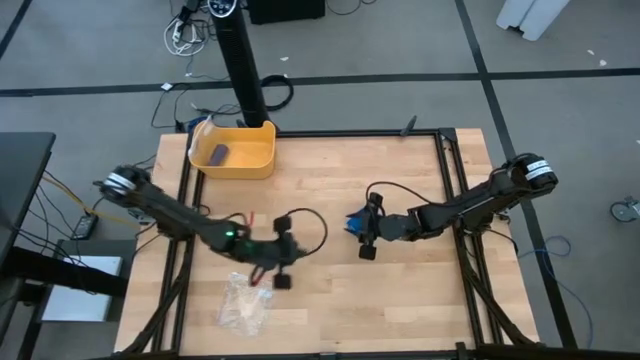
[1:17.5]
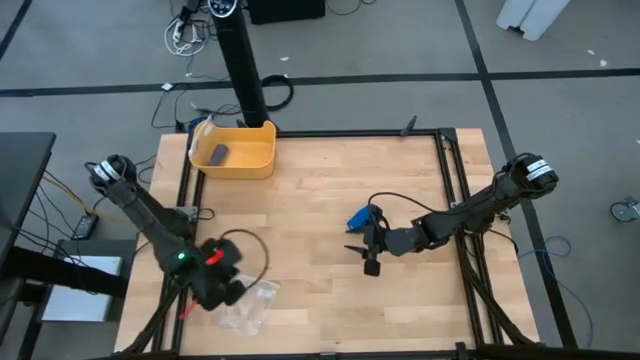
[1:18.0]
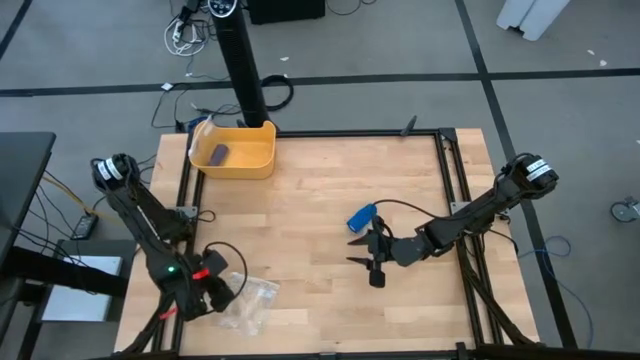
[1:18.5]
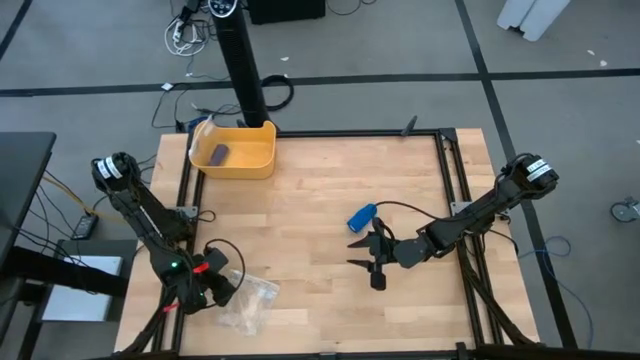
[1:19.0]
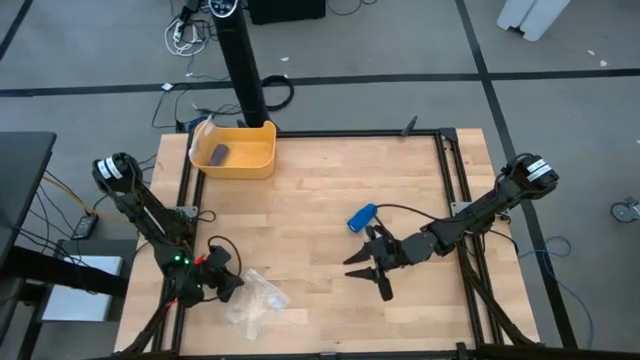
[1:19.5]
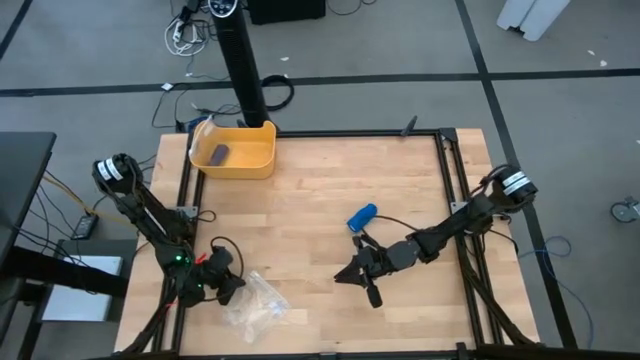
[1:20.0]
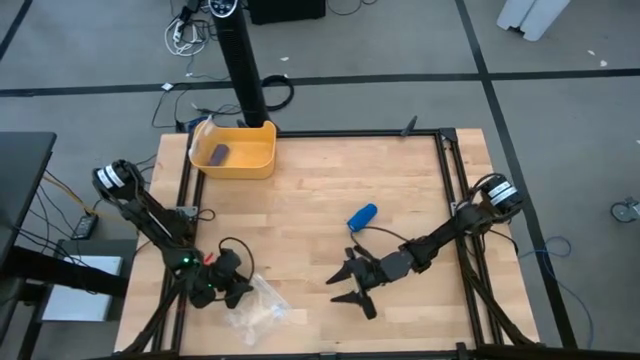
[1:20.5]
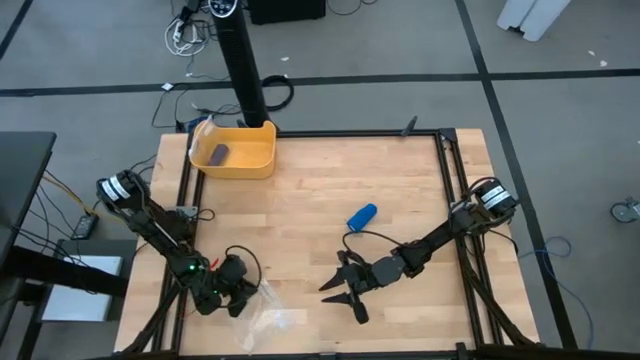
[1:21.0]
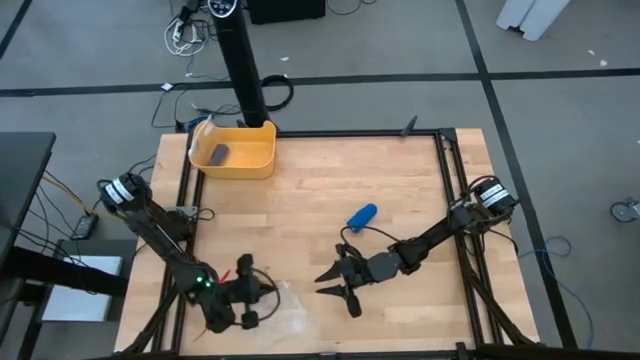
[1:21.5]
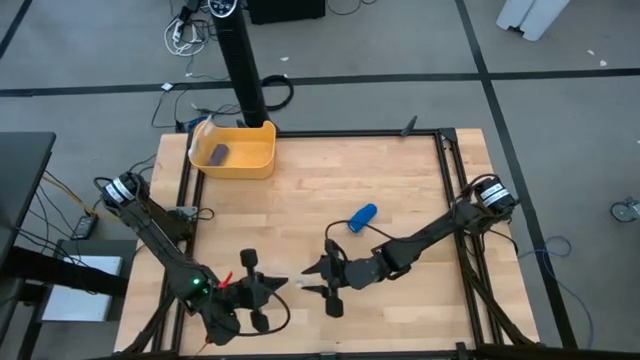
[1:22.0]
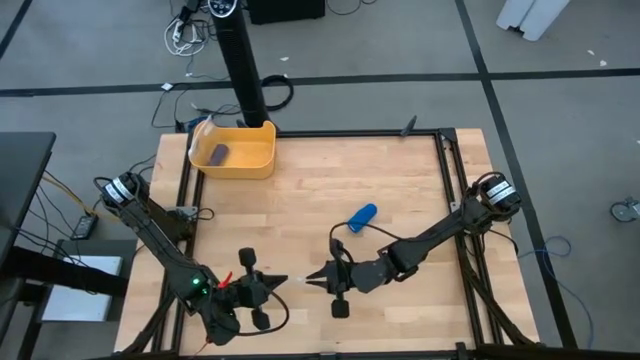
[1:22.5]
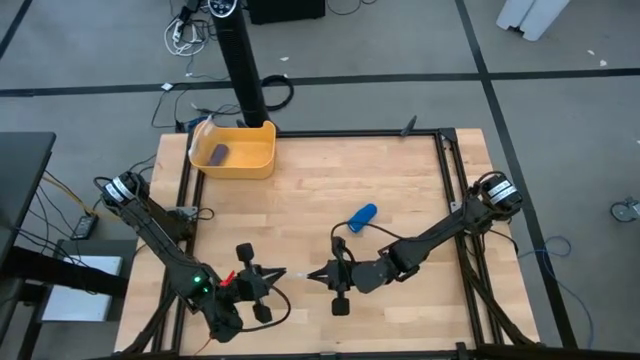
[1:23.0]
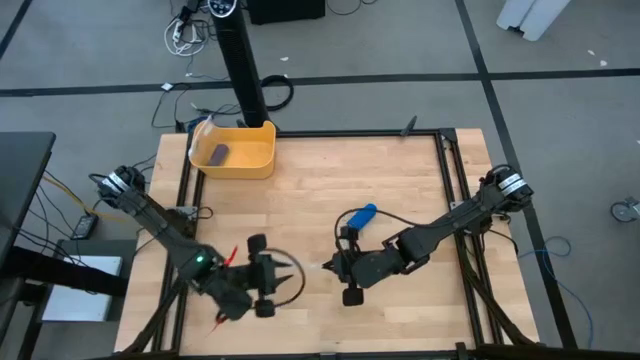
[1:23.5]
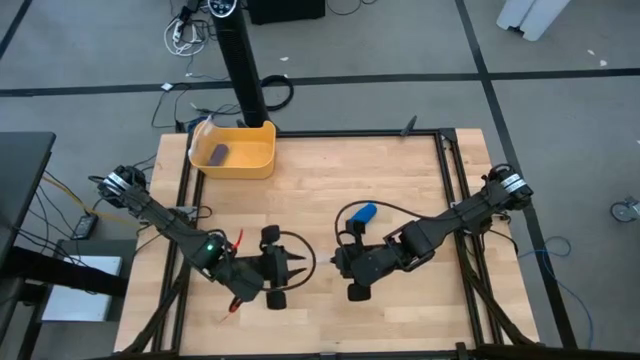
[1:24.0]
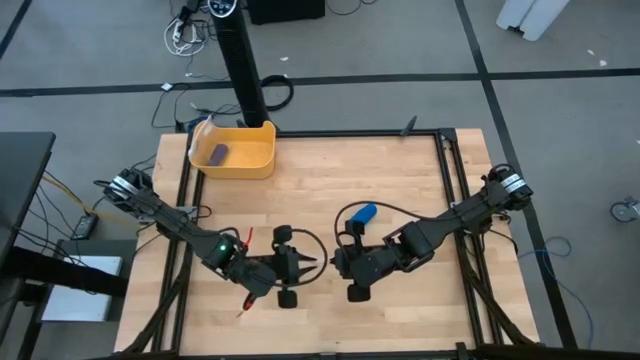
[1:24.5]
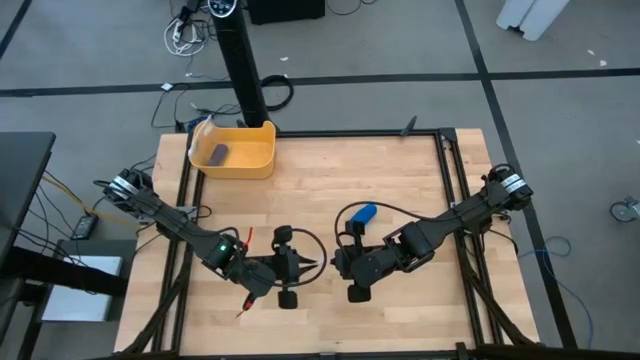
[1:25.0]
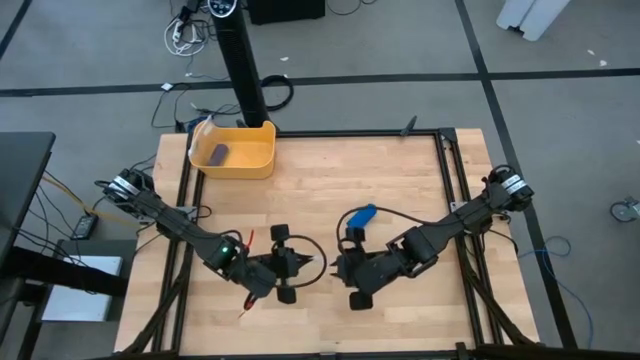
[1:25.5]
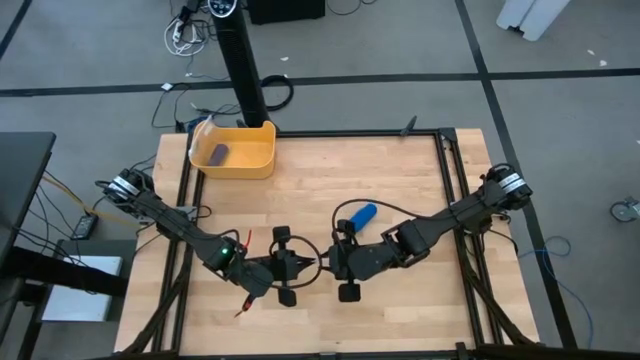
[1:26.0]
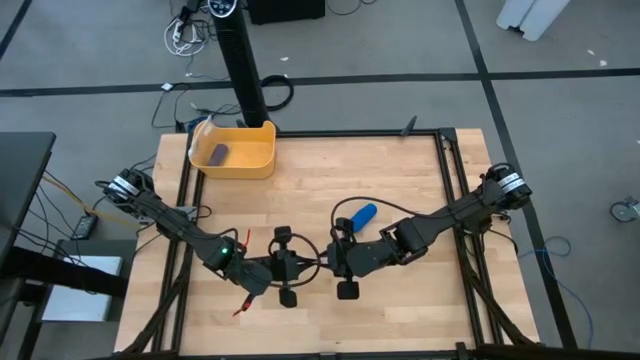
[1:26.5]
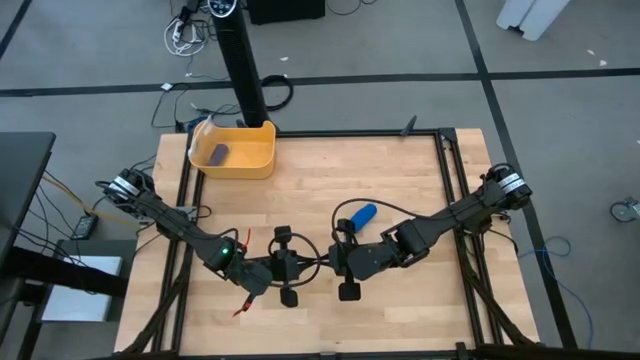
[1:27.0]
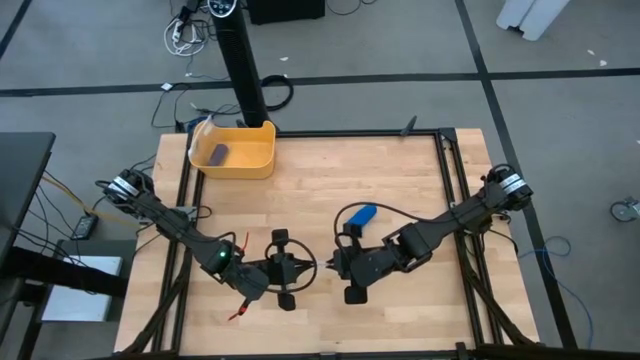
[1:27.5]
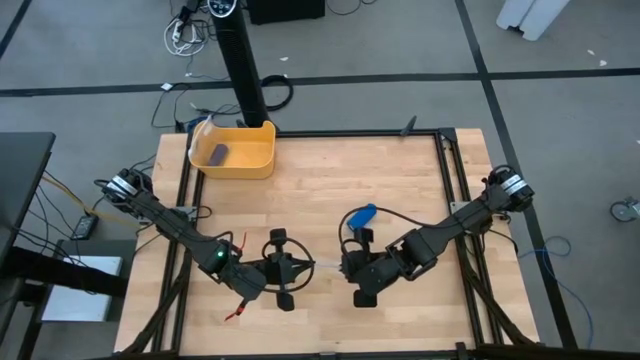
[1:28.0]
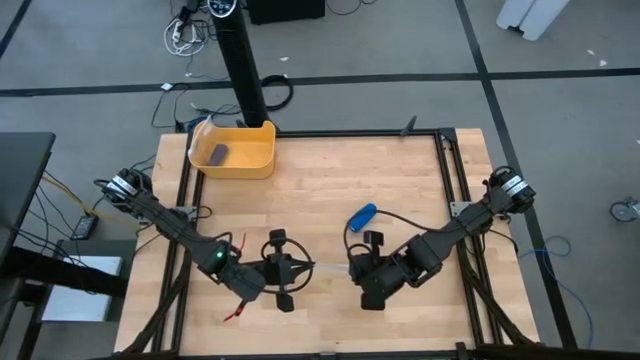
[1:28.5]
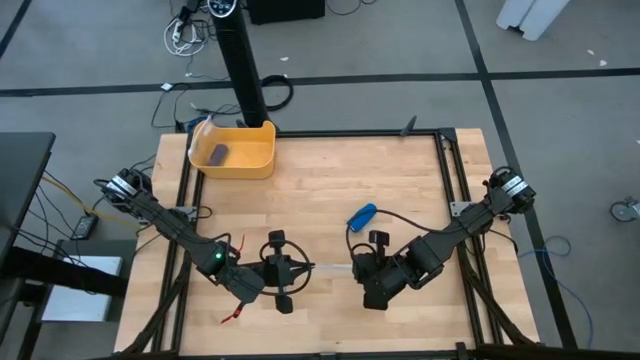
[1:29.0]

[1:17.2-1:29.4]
Task: Roll bandage
Open the transparent zip bag

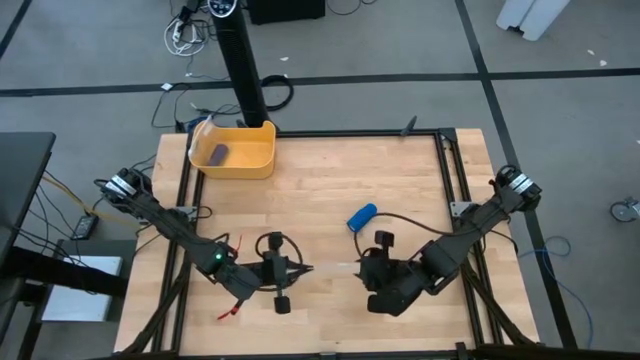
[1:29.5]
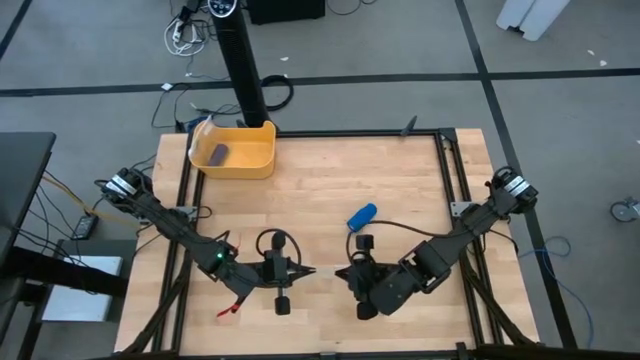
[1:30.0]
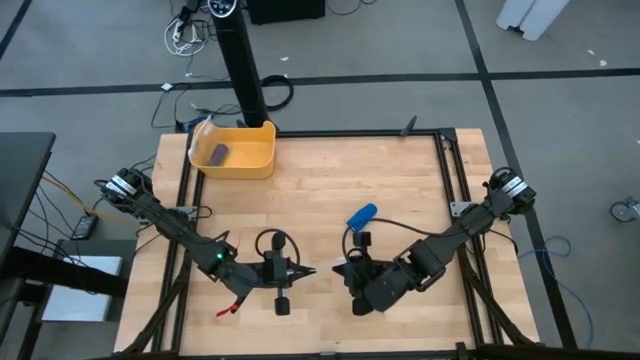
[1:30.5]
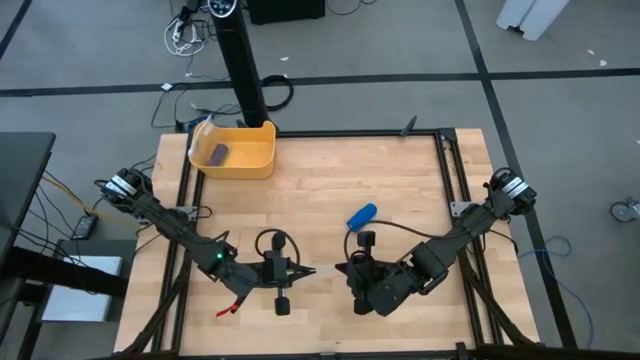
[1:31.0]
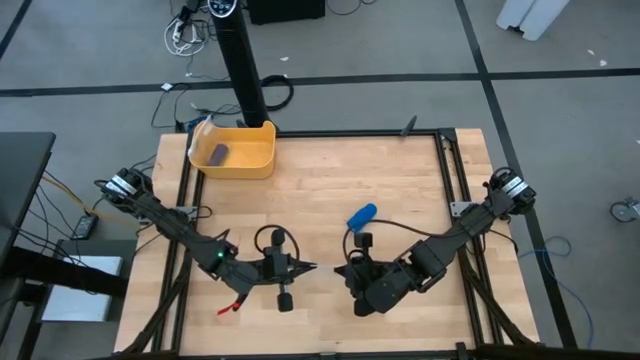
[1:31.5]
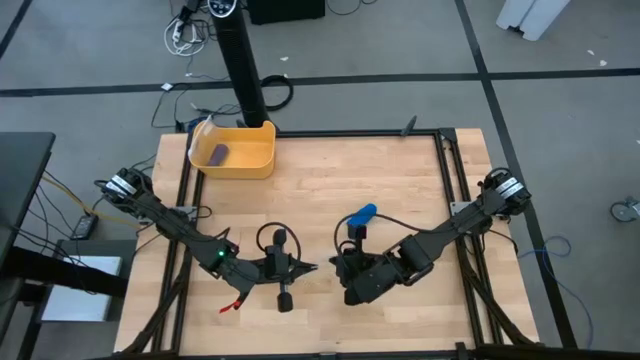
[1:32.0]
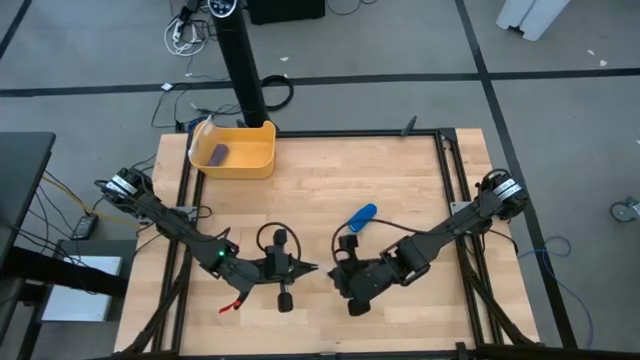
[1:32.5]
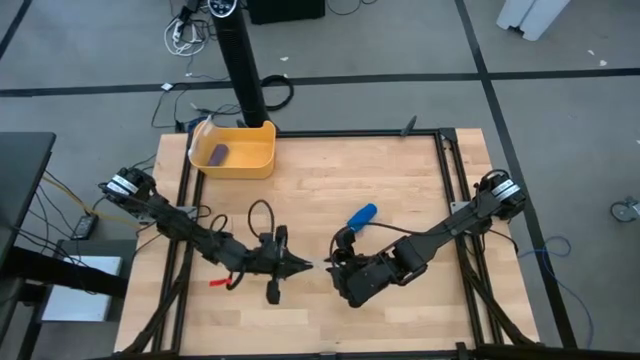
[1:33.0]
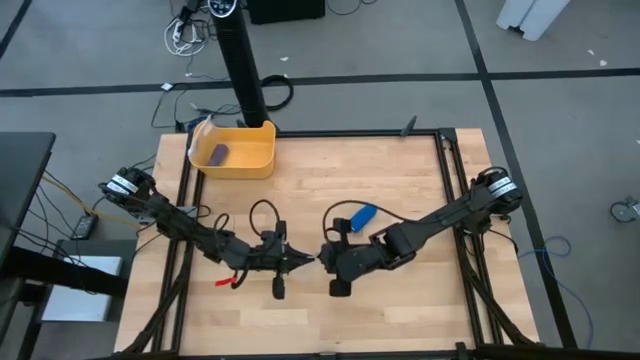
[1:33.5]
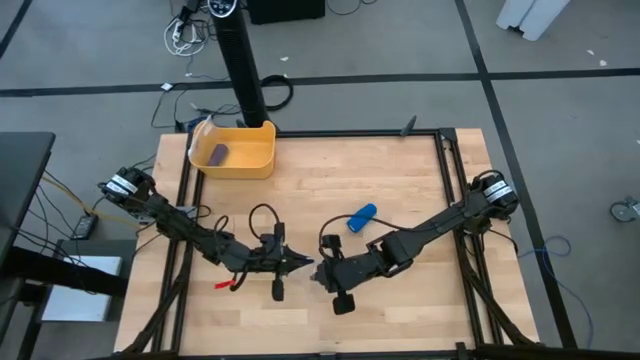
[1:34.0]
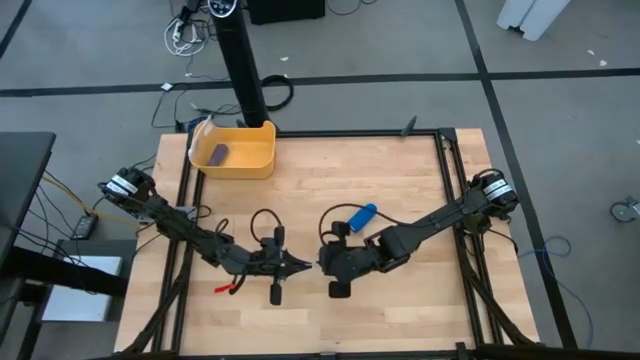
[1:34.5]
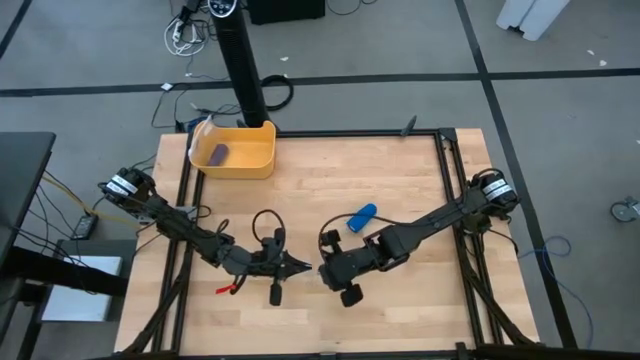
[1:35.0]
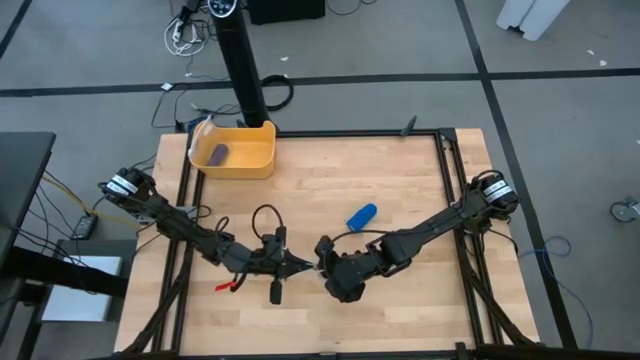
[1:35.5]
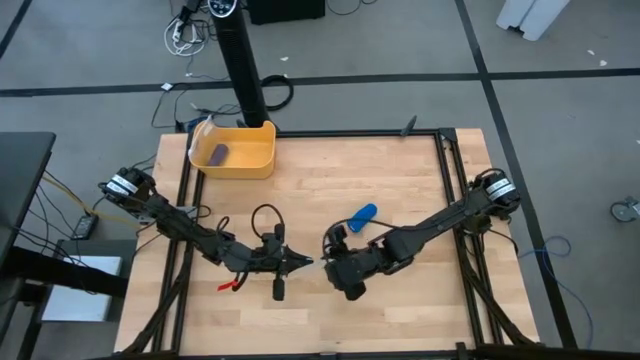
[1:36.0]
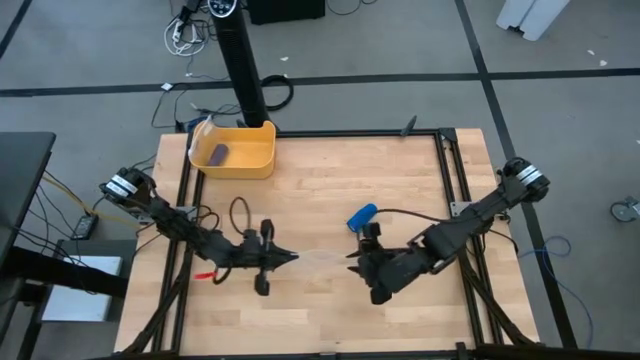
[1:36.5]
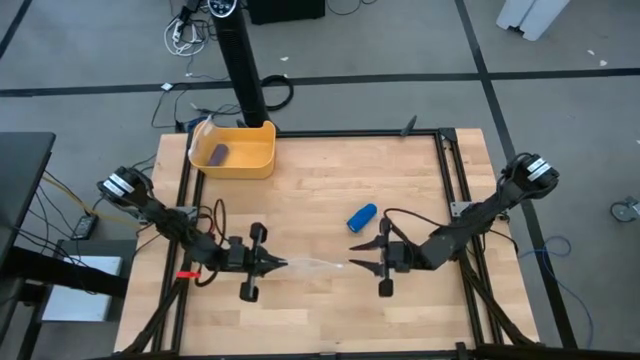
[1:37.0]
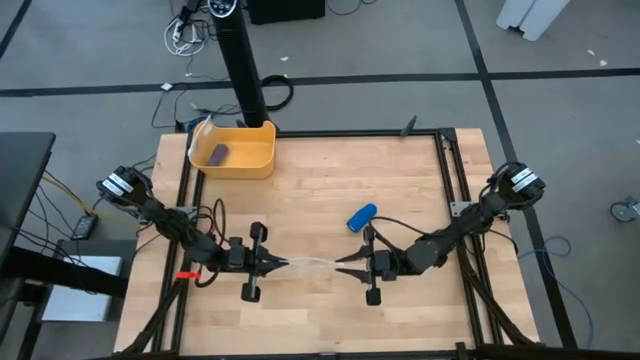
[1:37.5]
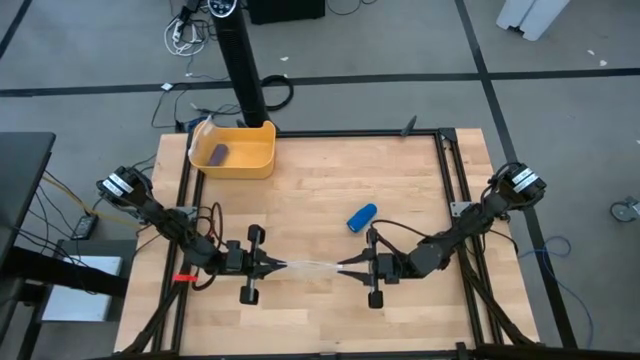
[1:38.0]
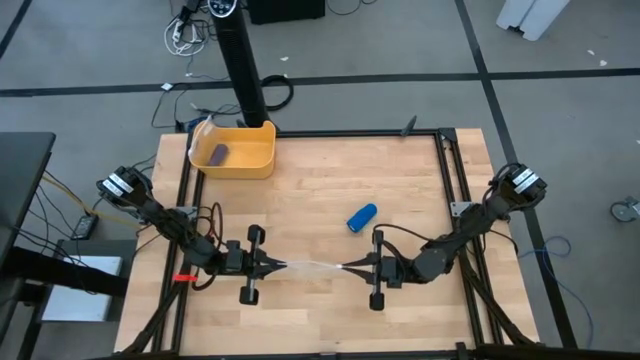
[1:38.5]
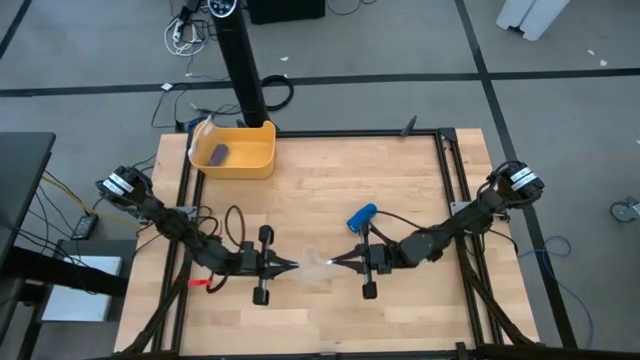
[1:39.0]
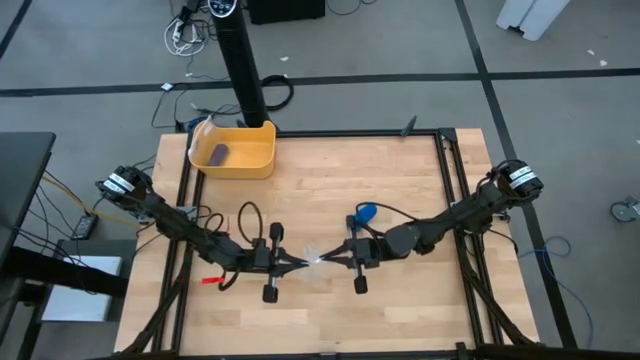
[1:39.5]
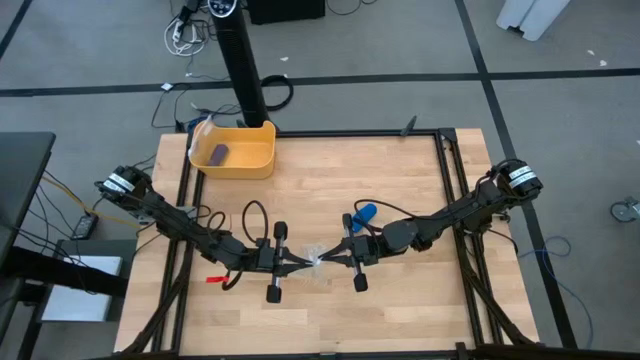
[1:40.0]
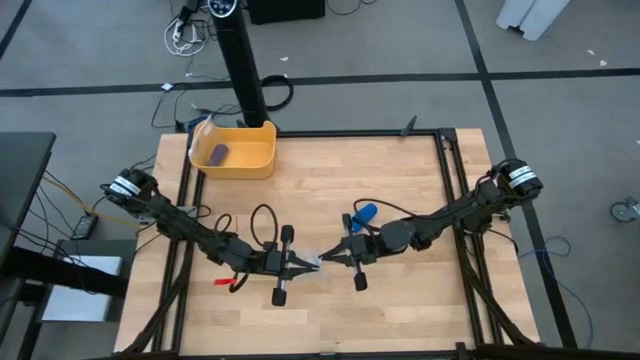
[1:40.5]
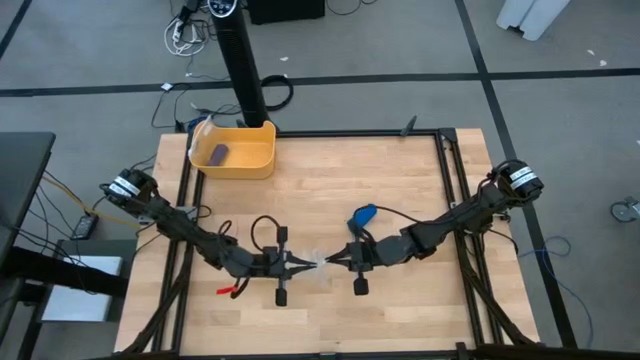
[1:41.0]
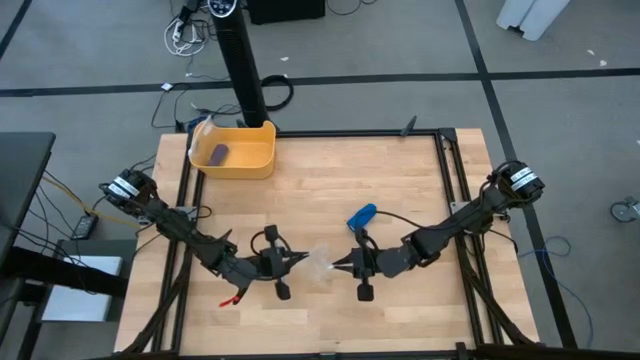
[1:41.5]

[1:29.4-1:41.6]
Open the transparent zip bag
